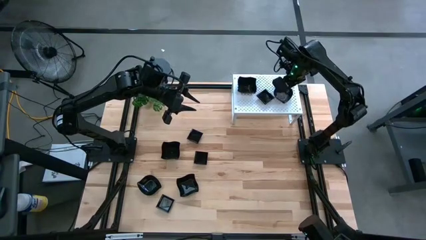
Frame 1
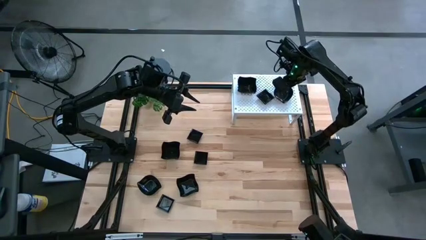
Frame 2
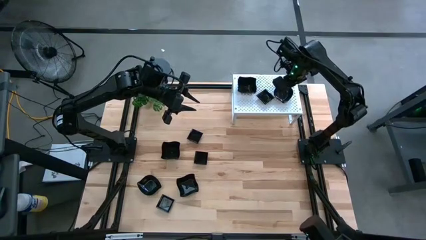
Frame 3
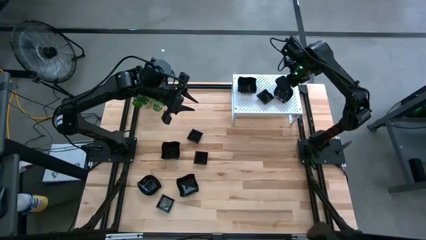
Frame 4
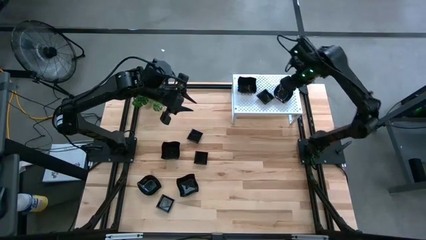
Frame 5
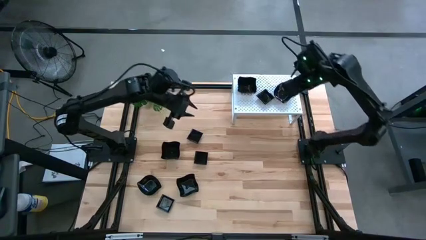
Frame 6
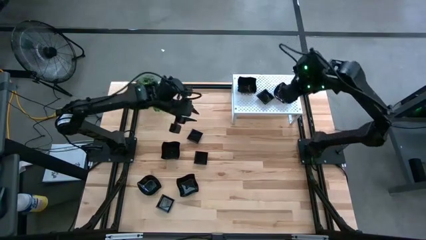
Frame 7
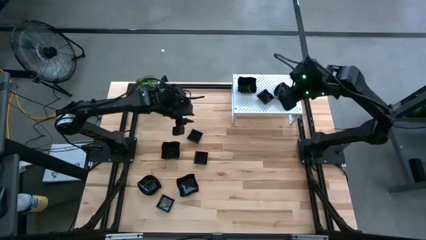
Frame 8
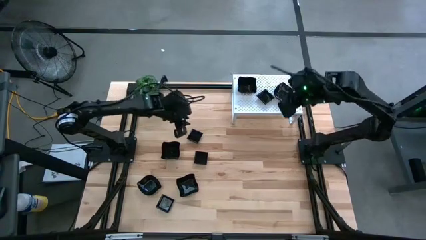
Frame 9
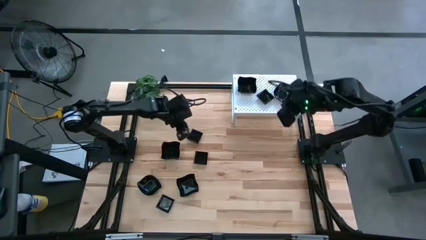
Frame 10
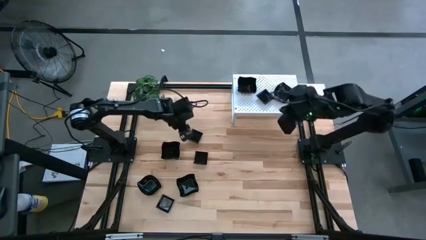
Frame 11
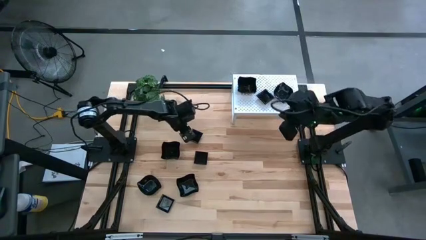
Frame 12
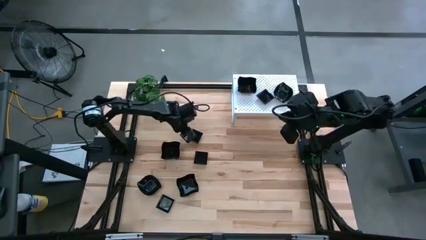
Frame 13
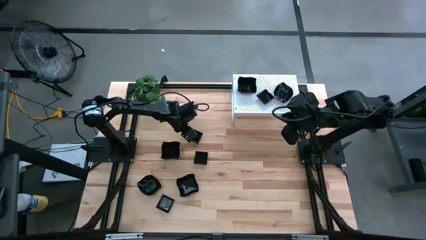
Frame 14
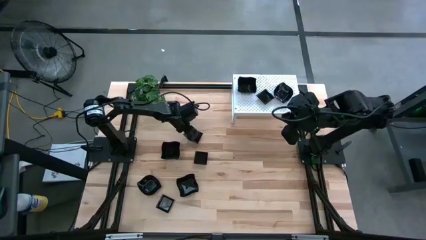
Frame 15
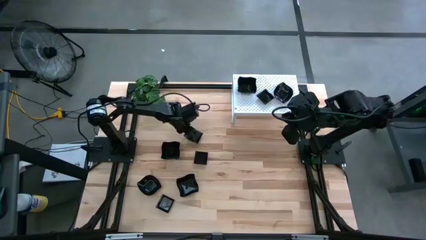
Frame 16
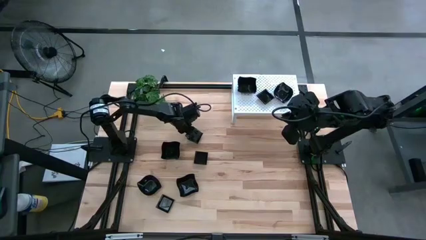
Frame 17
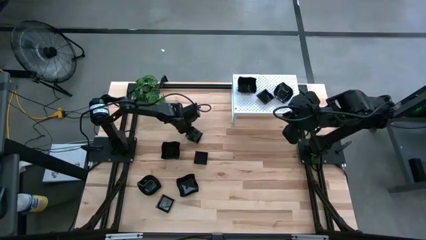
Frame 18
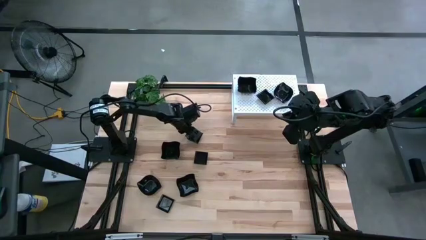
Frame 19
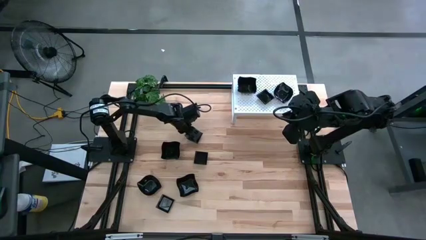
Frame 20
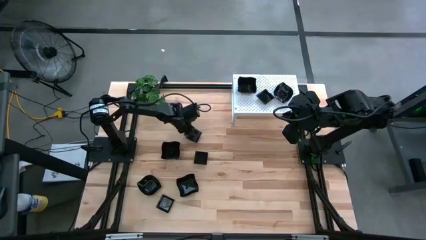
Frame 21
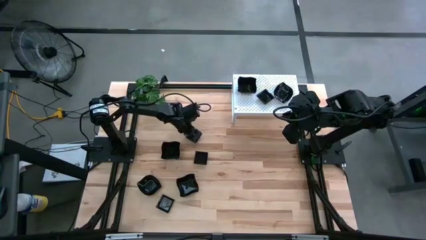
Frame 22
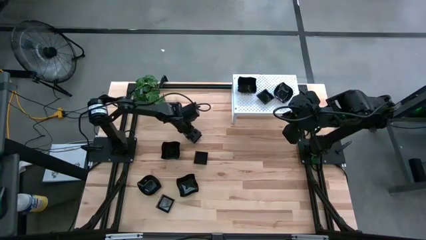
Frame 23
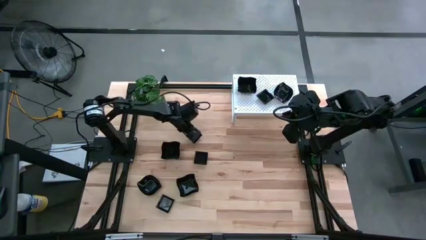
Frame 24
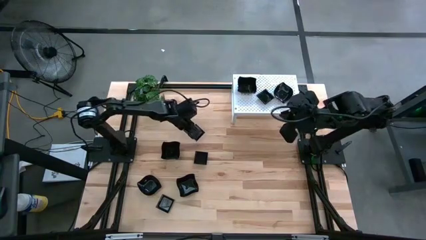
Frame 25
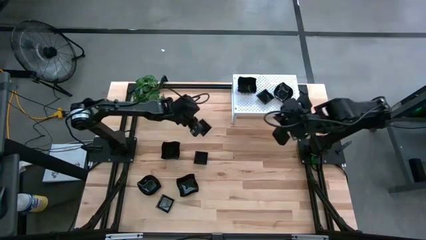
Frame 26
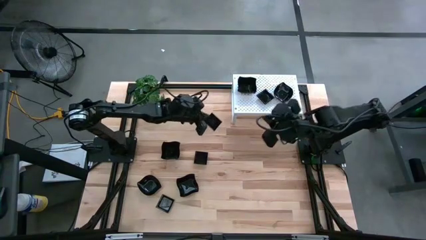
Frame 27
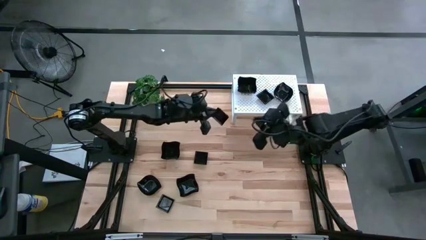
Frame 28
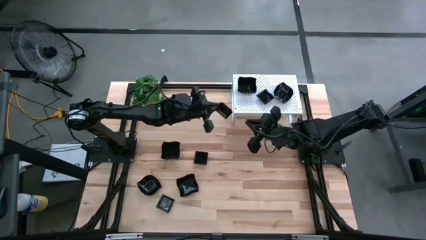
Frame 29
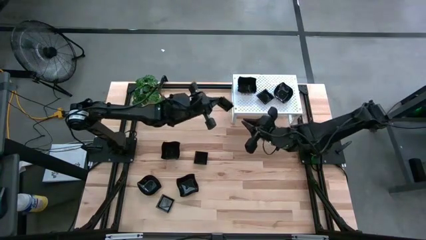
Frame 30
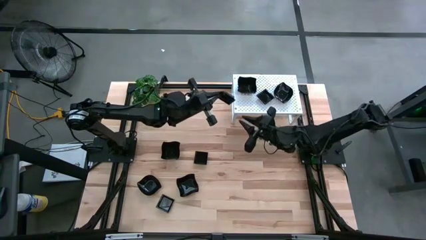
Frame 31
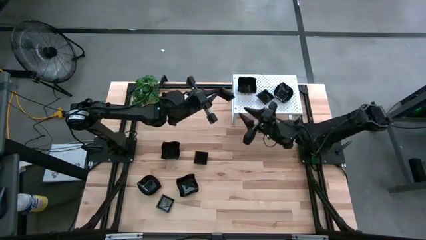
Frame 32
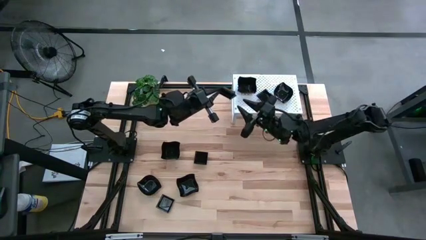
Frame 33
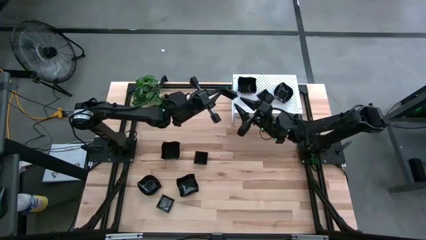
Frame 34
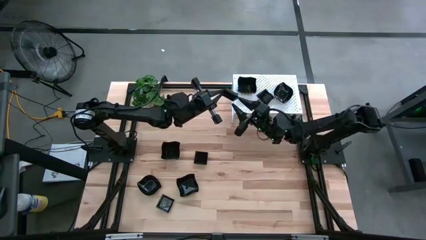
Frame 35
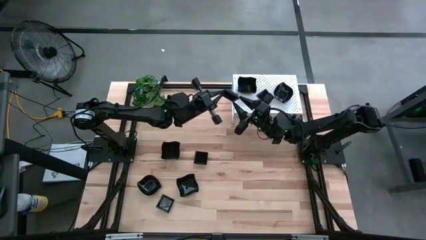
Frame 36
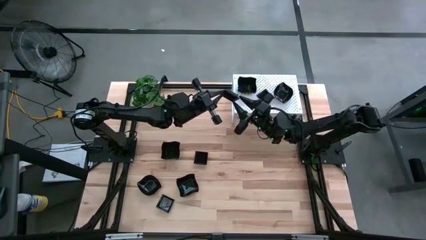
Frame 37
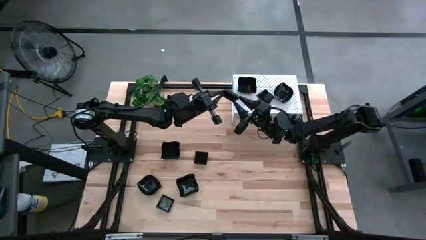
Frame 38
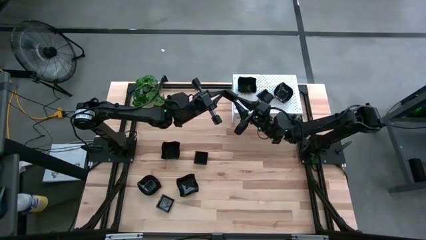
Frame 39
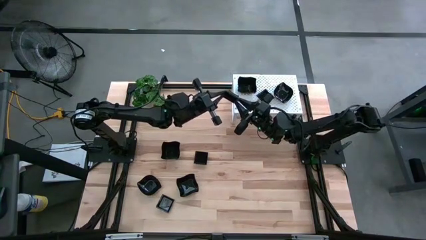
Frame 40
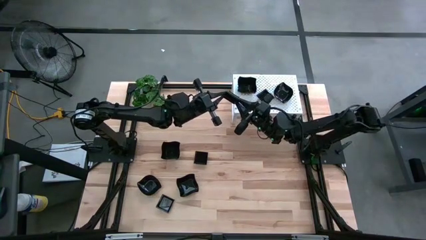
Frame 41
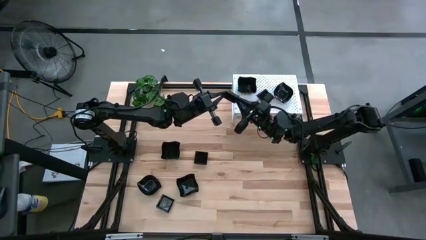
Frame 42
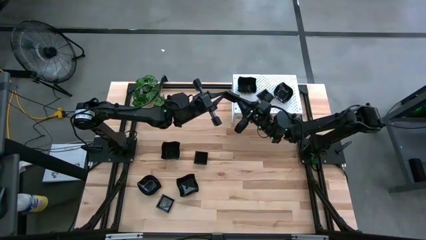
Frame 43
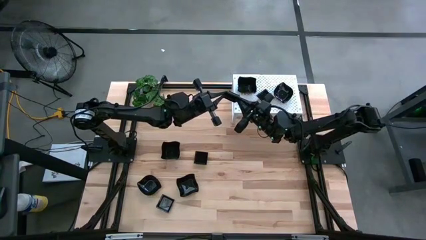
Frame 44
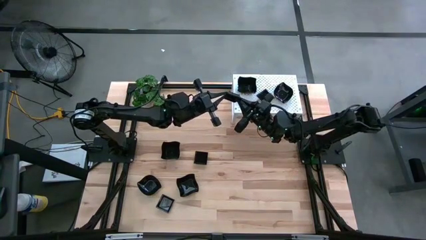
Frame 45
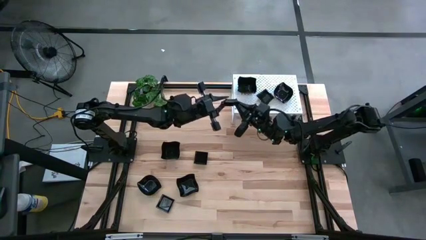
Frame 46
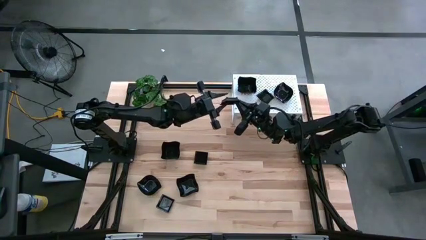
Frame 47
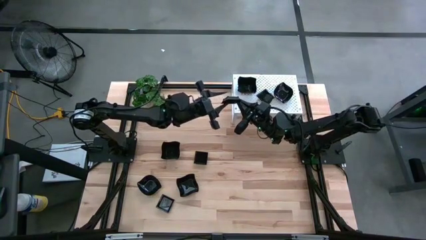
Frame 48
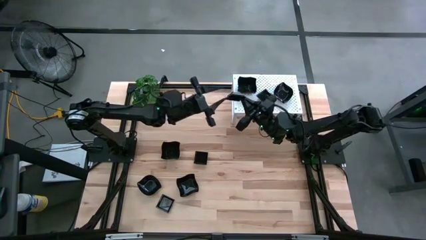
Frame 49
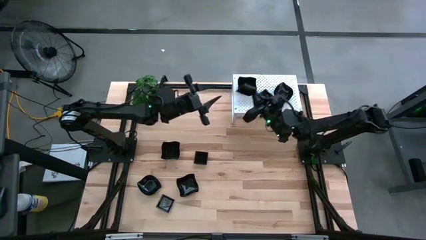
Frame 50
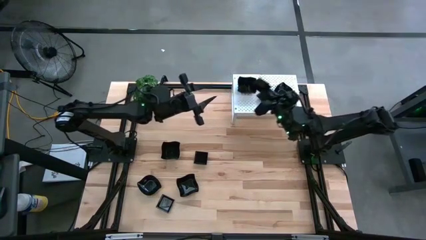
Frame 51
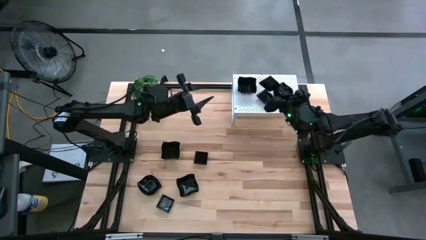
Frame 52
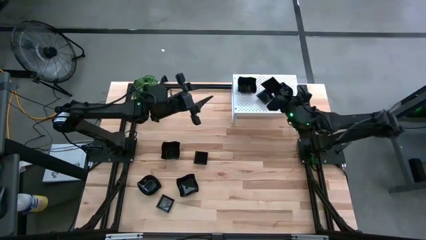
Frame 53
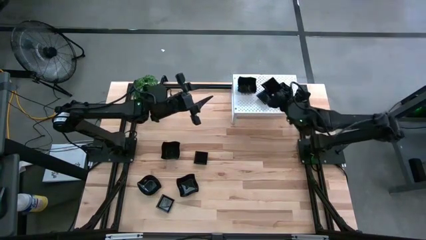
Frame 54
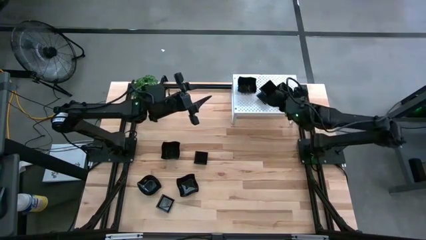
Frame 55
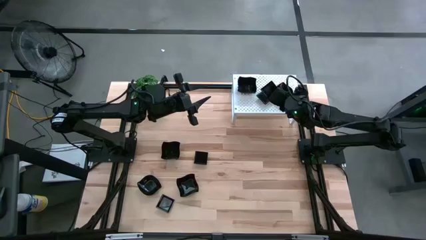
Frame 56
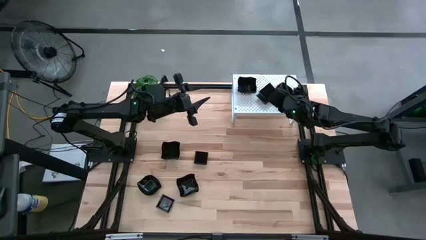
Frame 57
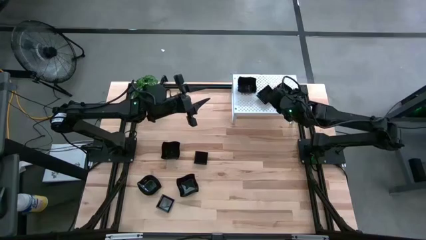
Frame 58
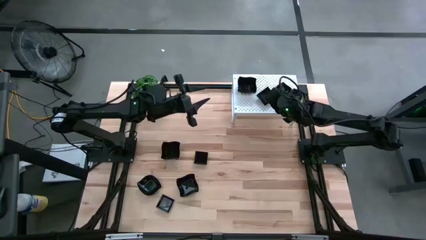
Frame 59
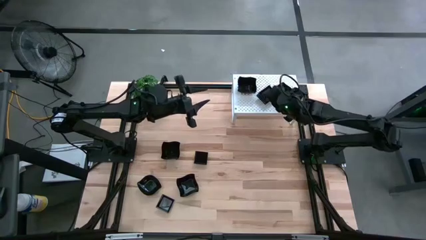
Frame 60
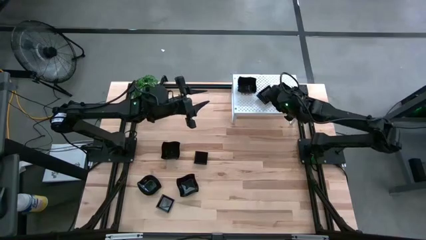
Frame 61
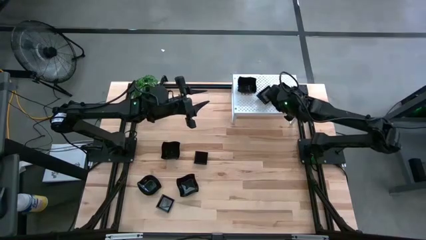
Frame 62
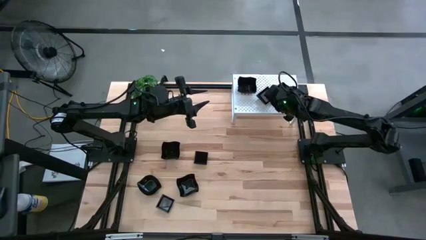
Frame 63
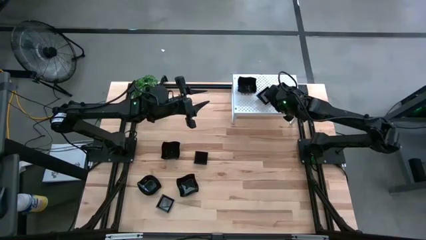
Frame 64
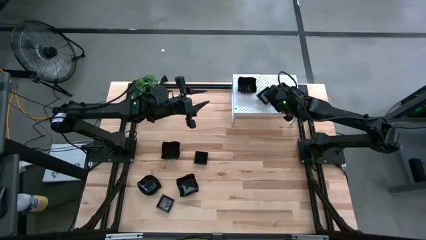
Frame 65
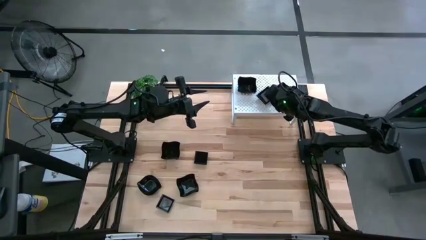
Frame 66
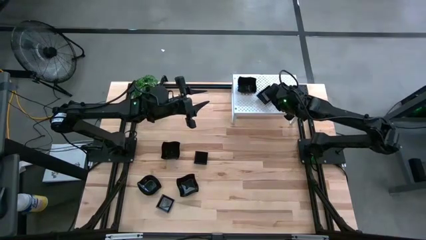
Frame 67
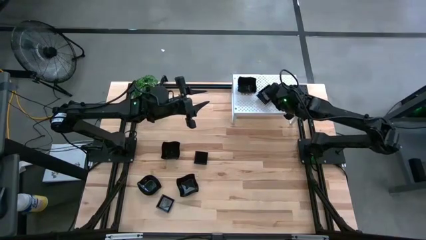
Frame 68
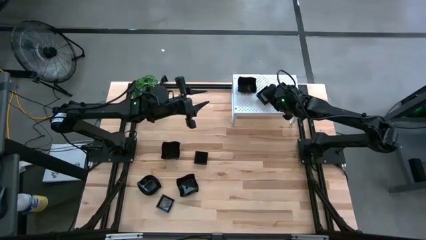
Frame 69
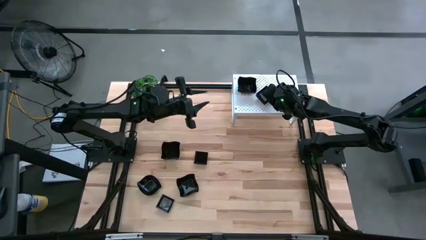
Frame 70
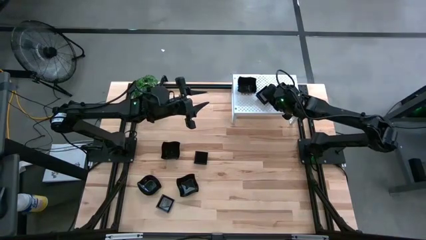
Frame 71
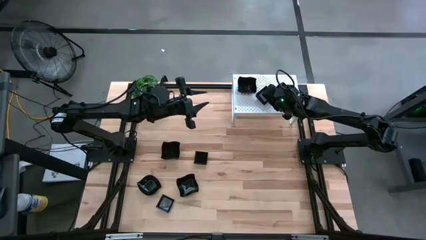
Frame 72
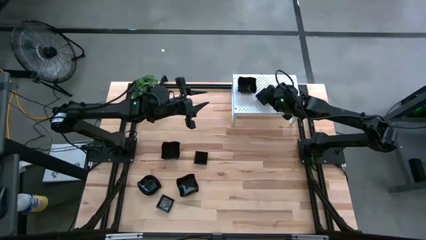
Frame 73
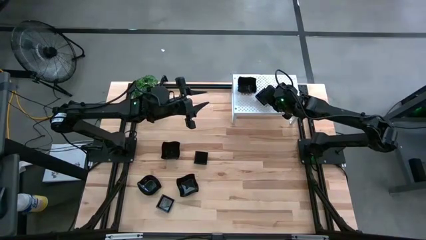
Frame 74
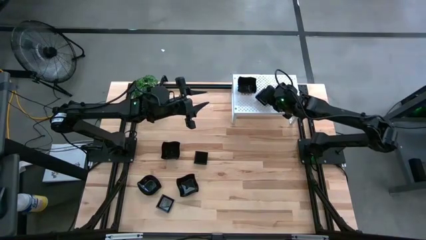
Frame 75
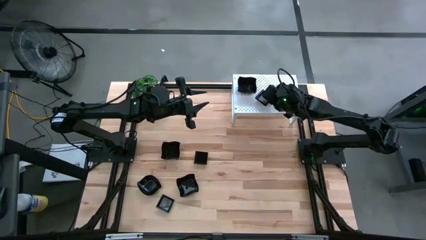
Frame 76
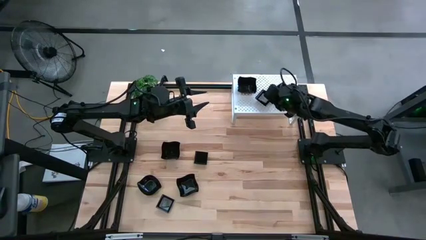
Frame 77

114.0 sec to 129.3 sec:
Task: Pick & Place Mini shaped plates
Stack the square plate on top of the square plate on the shelf
